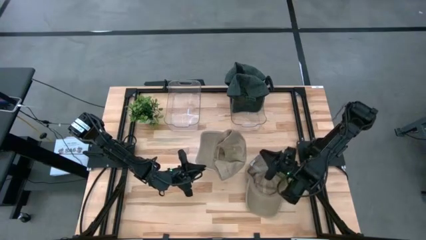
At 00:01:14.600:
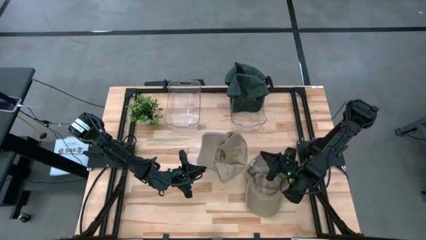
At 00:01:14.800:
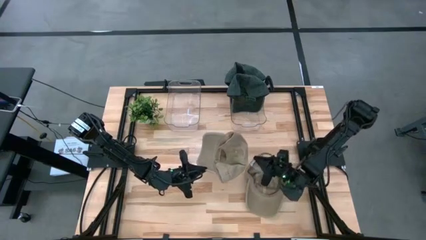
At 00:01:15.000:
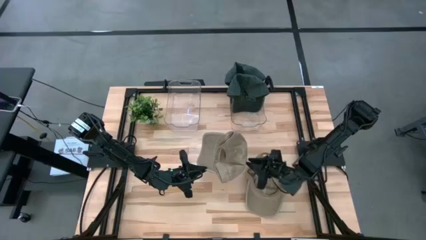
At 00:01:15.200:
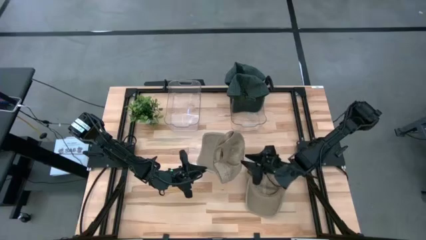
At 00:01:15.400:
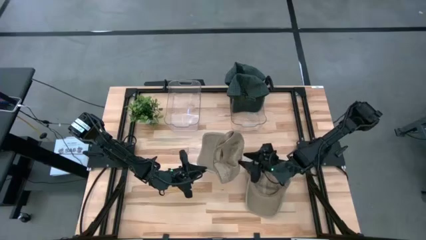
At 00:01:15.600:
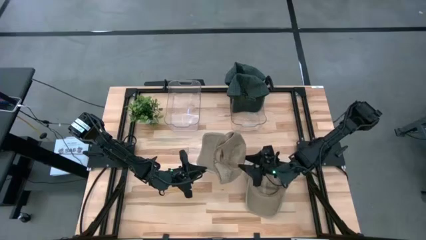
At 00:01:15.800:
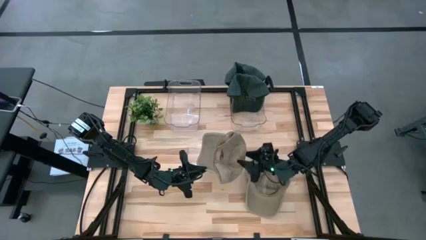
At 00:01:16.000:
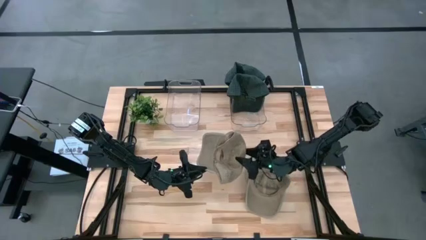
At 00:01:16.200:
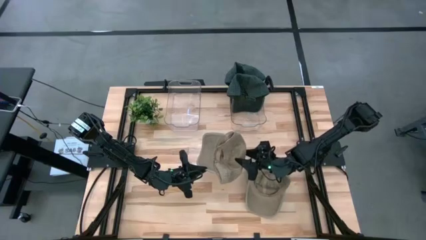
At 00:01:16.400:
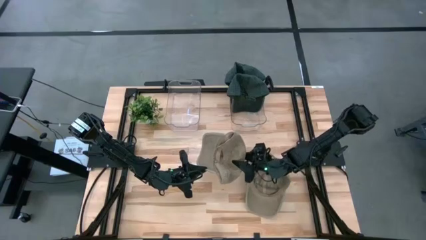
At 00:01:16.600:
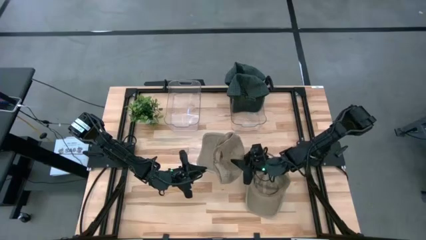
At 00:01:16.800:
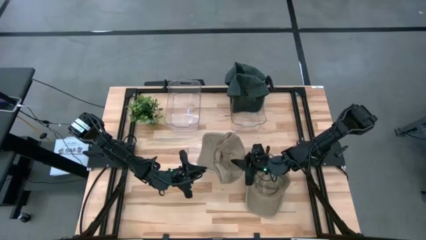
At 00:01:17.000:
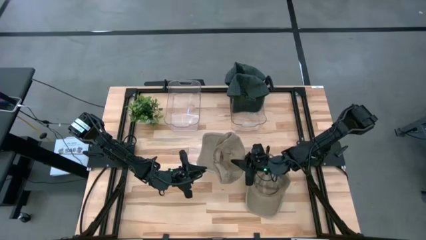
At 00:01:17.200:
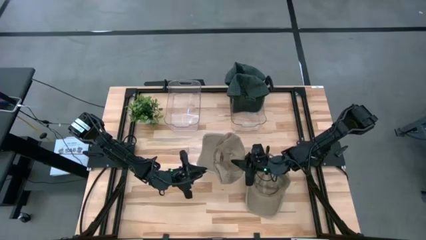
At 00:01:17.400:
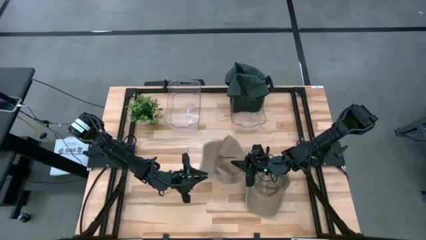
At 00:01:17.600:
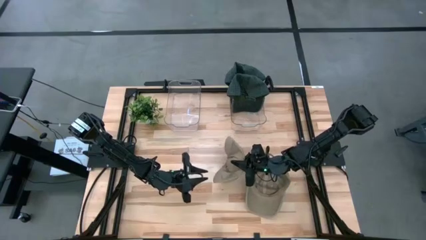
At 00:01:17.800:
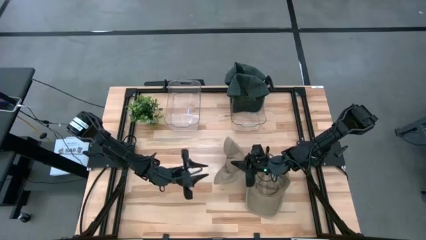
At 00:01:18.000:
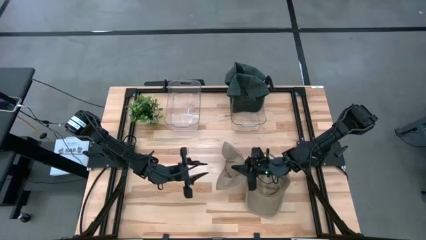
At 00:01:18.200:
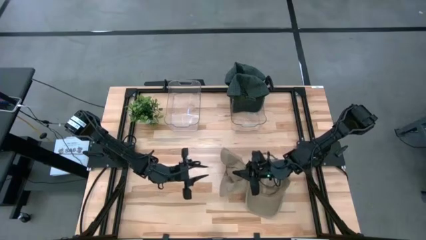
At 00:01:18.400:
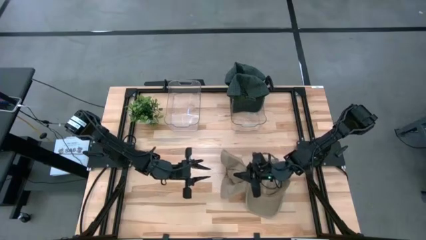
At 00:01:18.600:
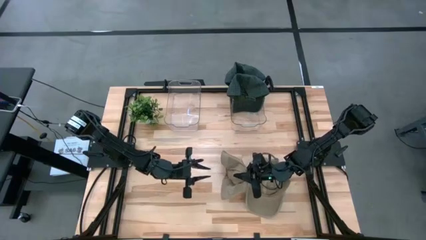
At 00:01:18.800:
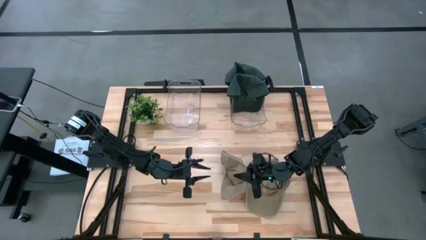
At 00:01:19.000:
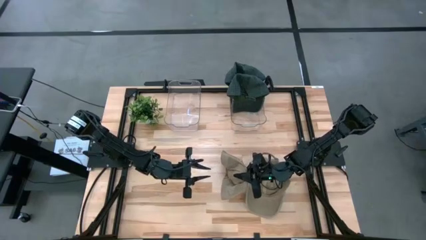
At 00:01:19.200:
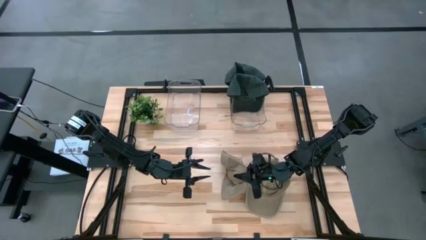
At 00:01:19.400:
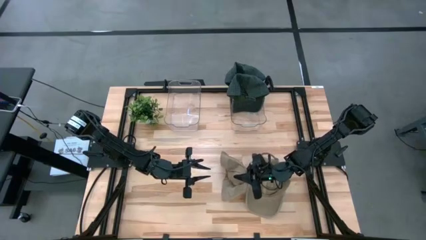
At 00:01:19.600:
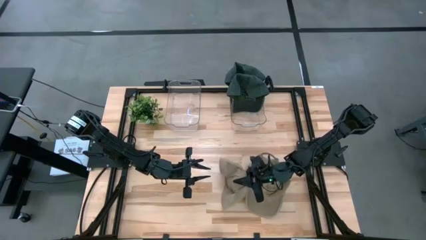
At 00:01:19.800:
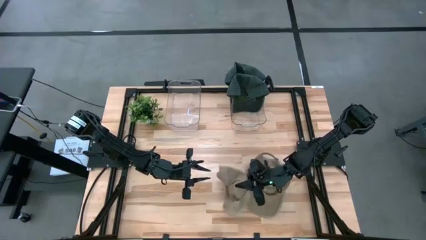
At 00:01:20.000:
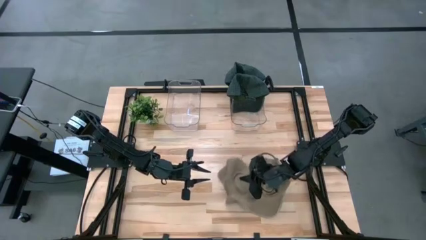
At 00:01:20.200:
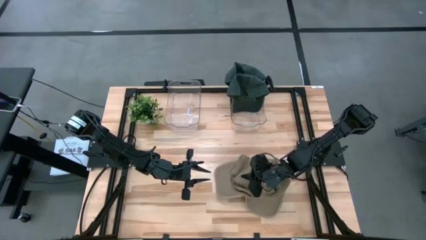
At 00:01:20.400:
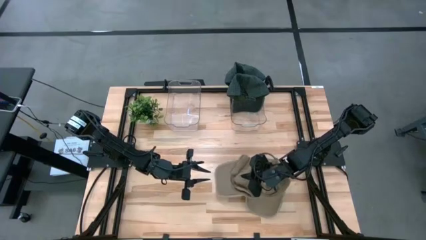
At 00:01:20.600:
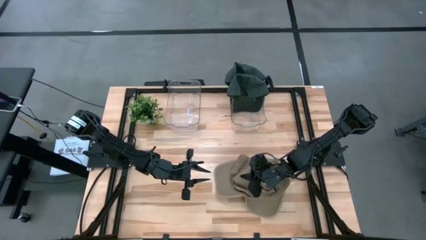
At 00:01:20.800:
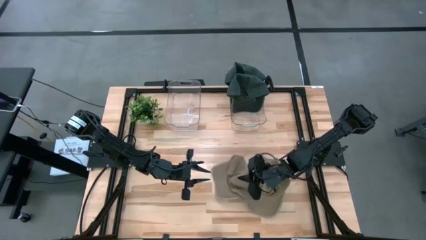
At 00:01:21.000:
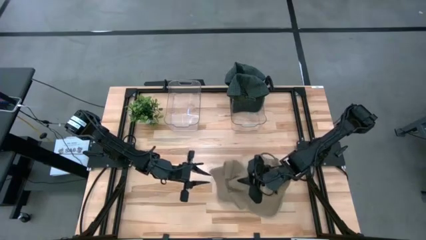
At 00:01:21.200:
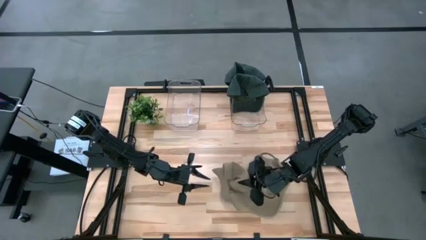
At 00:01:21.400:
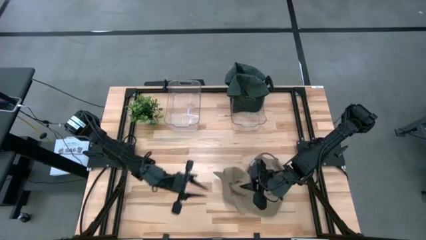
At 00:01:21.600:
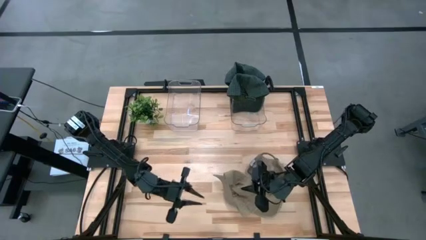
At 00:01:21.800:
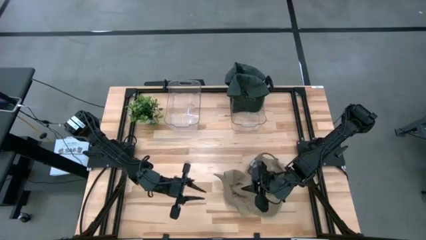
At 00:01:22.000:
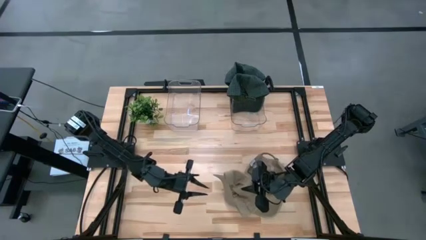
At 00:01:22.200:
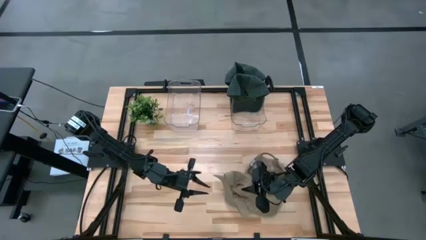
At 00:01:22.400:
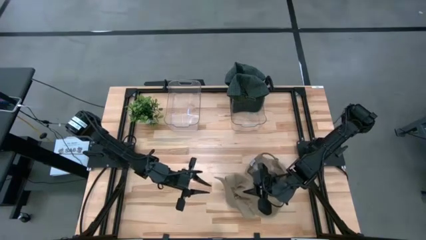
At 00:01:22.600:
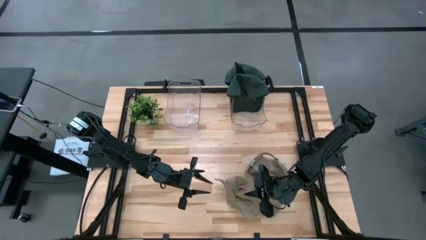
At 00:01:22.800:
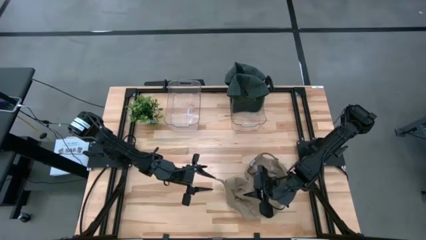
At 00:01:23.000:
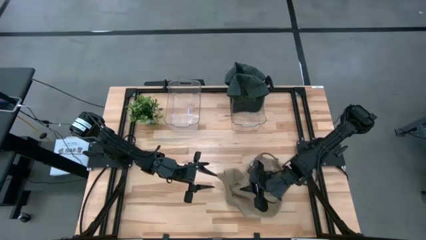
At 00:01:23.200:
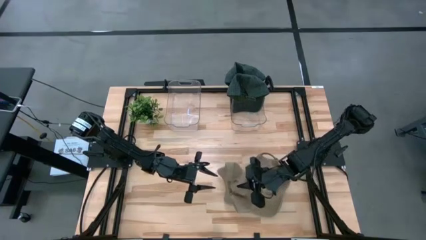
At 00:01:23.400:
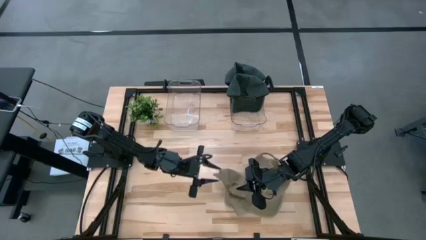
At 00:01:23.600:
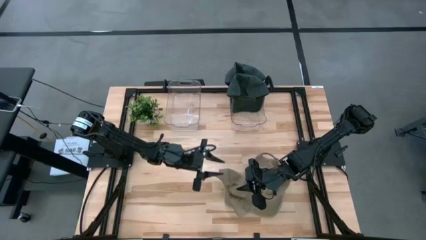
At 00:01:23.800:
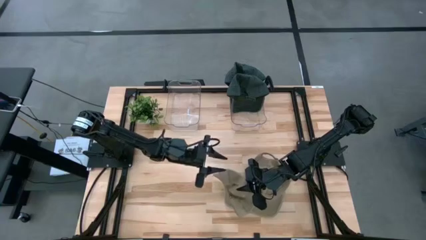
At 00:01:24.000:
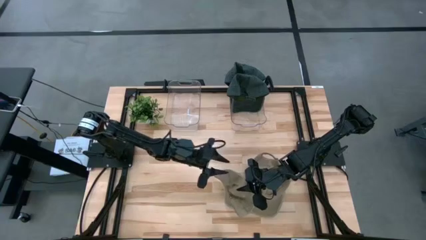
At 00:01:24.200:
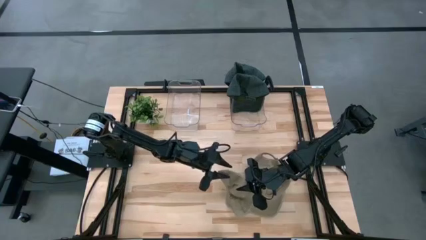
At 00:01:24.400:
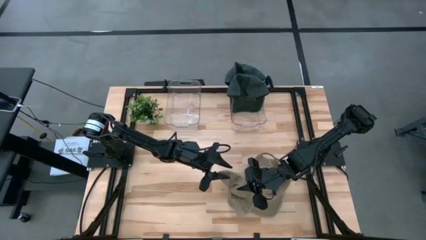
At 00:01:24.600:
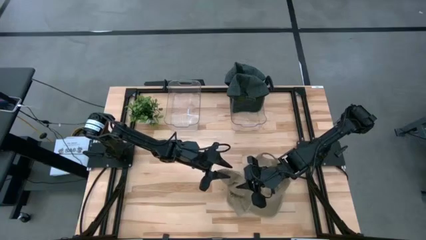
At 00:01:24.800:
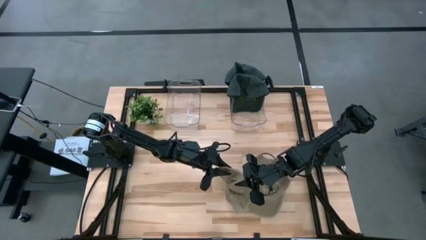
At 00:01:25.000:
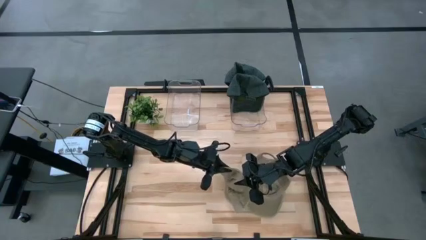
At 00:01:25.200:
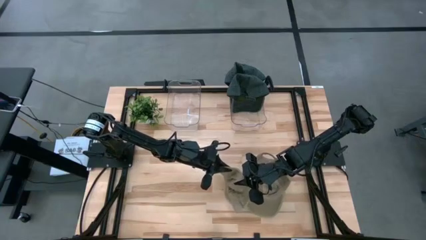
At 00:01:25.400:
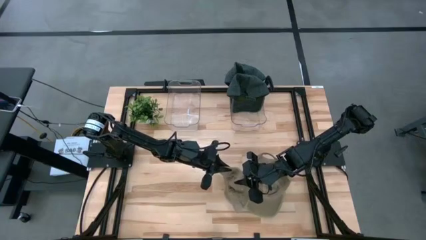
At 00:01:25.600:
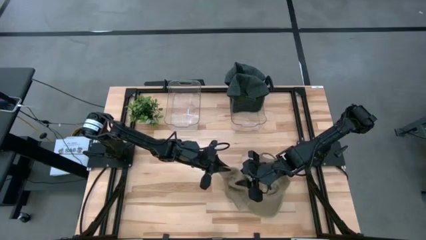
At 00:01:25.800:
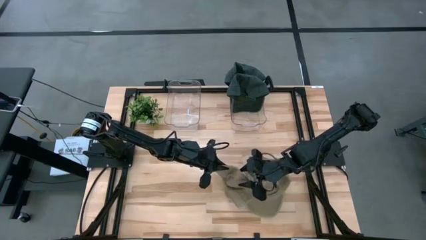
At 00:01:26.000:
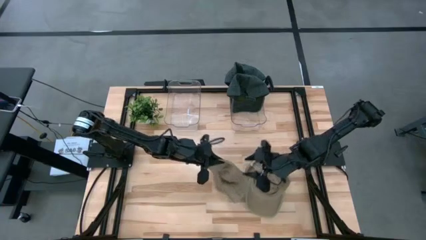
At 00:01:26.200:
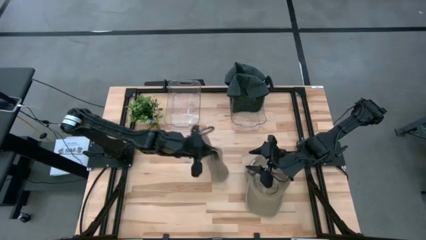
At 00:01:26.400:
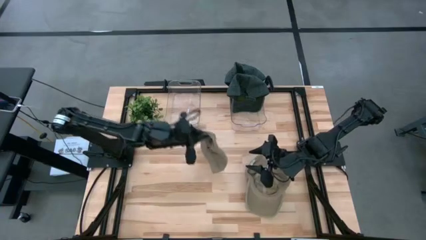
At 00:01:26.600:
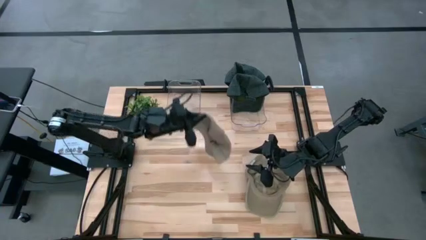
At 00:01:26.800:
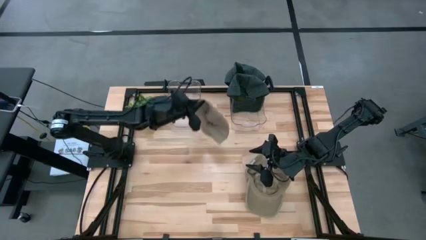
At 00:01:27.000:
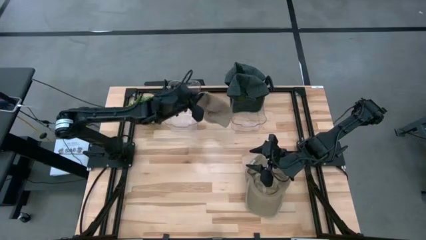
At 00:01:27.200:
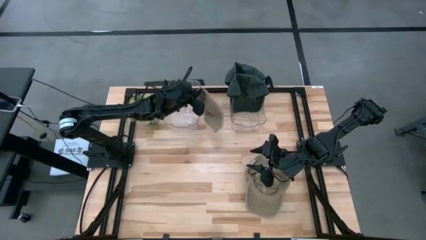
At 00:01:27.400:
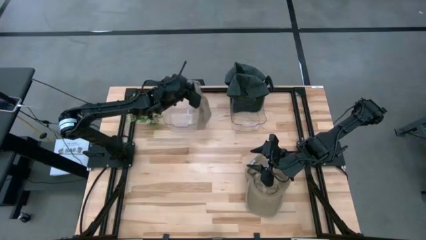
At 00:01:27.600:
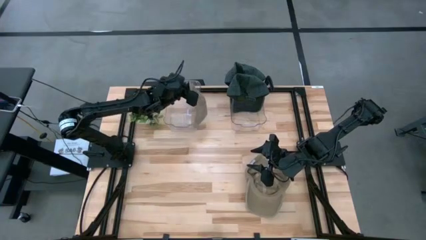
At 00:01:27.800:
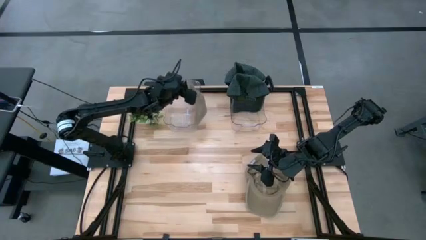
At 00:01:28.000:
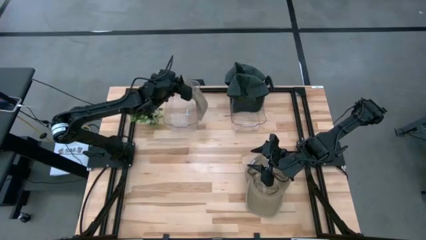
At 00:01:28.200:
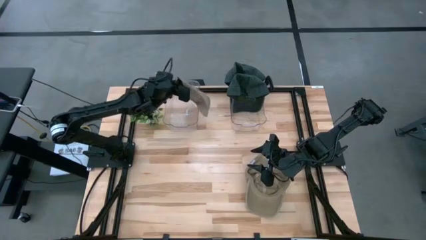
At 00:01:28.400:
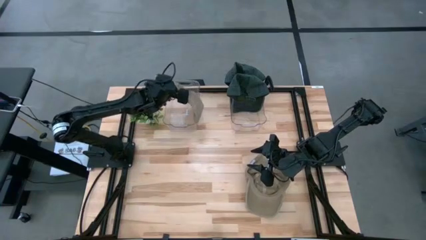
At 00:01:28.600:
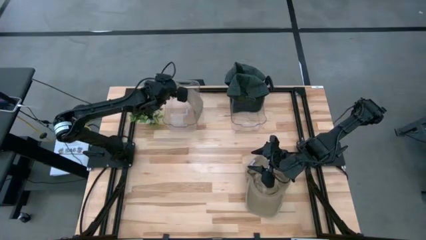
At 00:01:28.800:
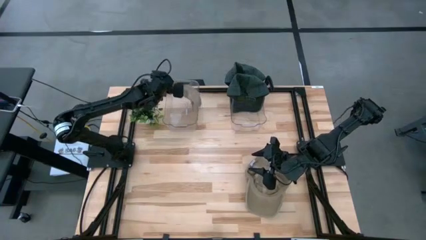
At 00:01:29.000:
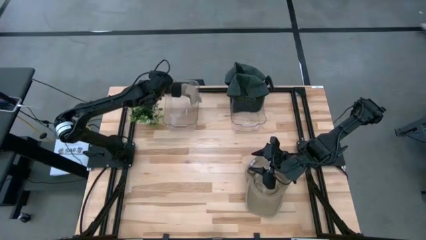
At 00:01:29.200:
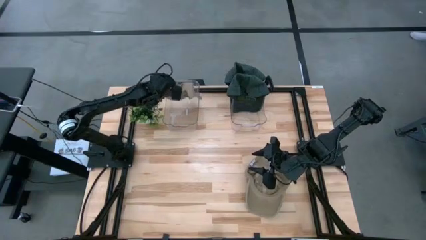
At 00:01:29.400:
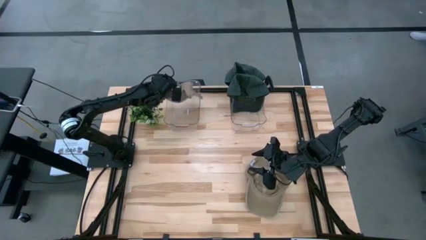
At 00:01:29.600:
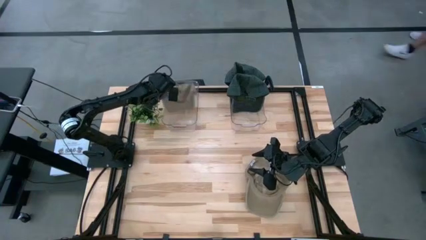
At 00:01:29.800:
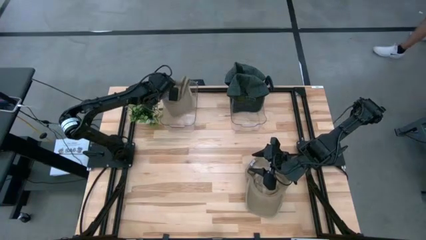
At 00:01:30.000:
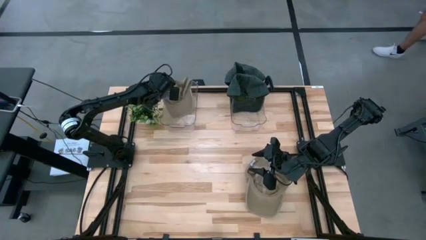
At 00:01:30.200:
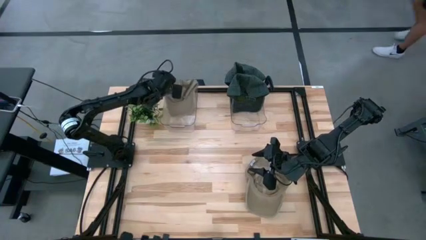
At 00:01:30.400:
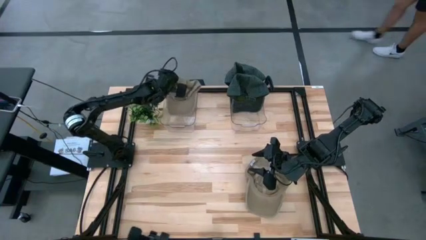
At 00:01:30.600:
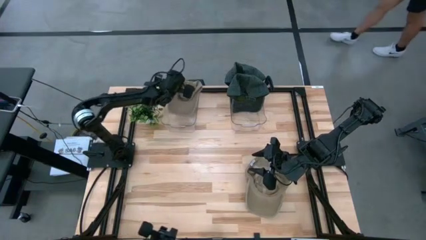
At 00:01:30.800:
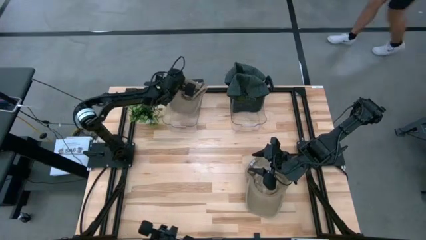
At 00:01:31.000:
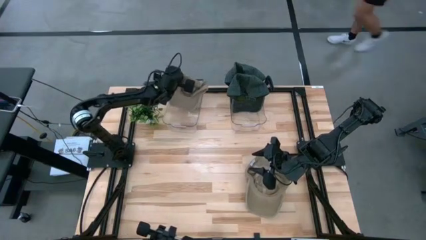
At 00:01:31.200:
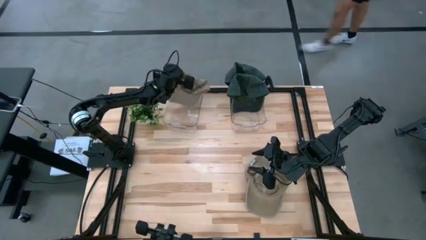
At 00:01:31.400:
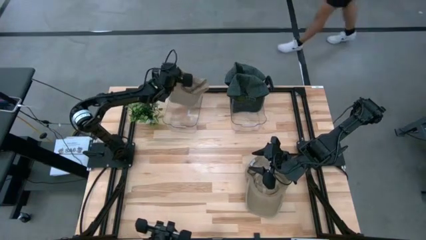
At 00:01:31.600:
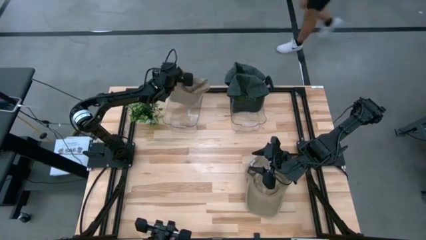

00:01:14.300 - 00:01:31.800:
Task: Pick & Place hat
Put the left brown cap into the left transparent bin
